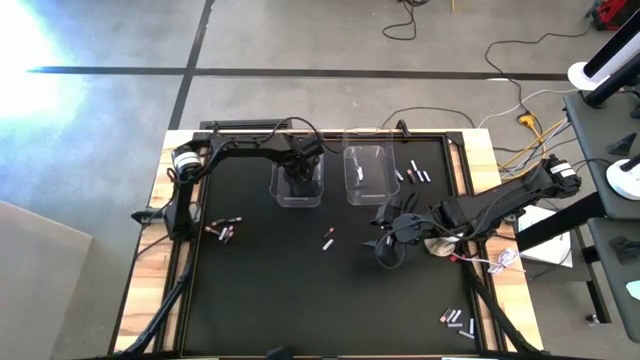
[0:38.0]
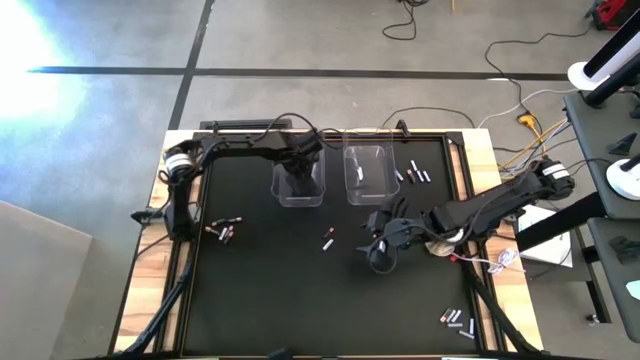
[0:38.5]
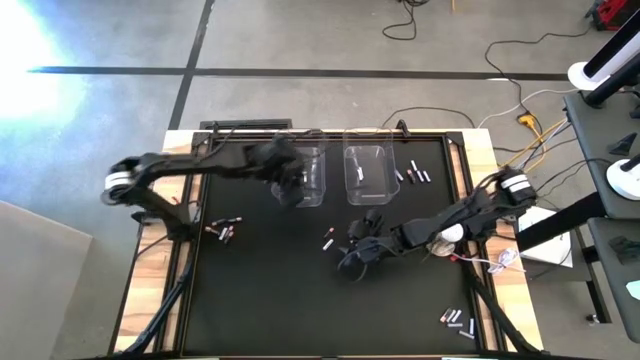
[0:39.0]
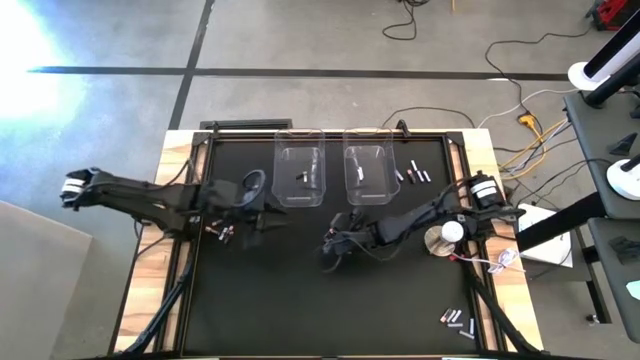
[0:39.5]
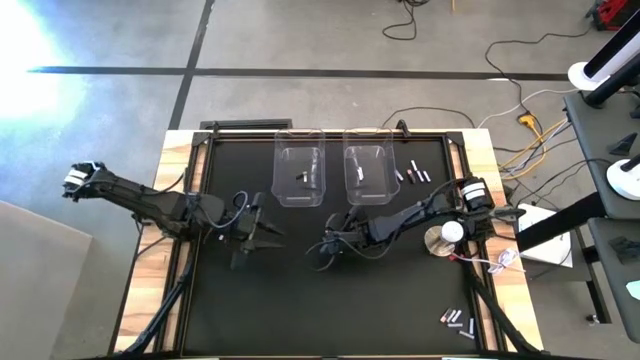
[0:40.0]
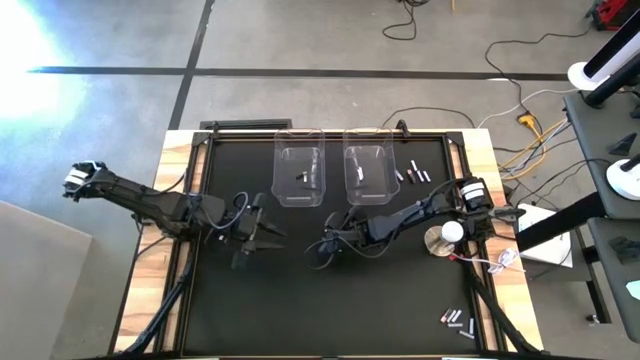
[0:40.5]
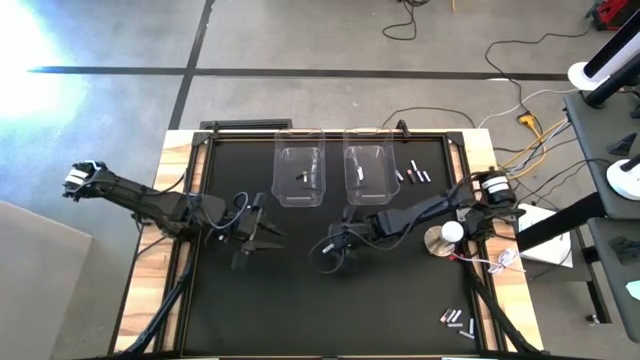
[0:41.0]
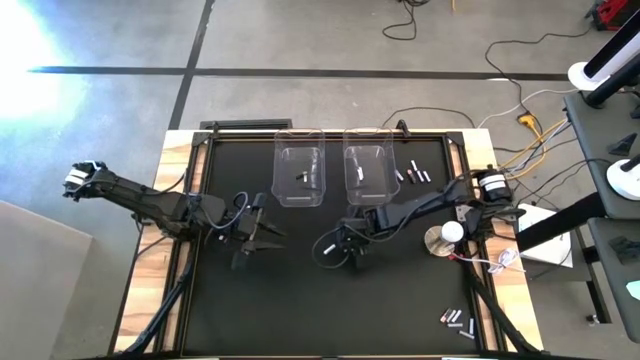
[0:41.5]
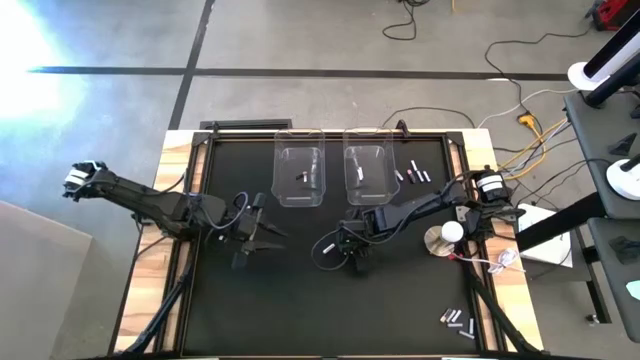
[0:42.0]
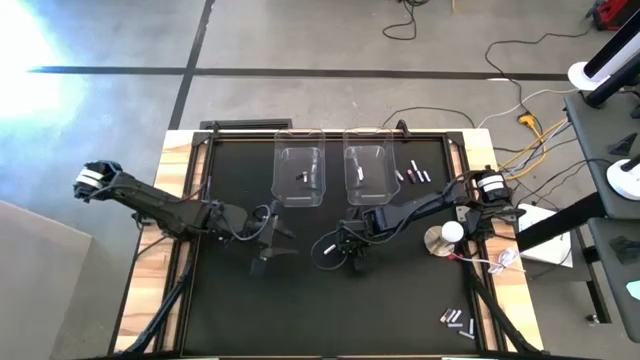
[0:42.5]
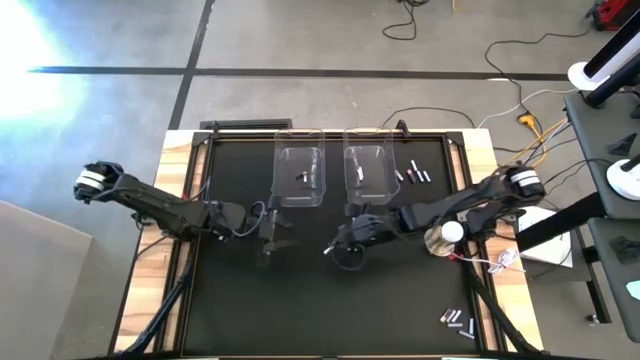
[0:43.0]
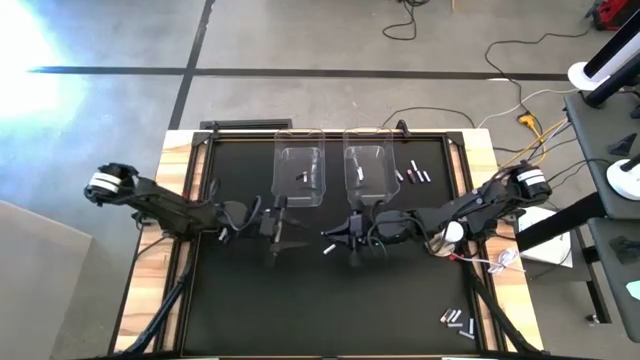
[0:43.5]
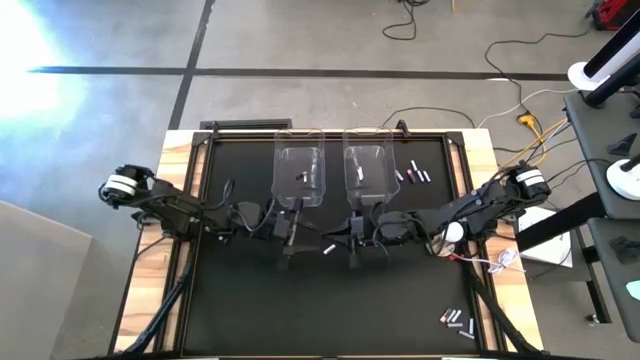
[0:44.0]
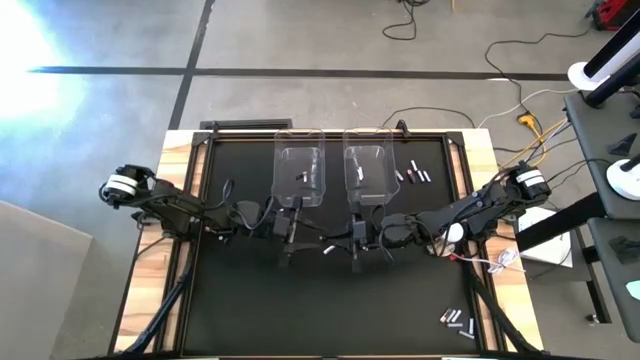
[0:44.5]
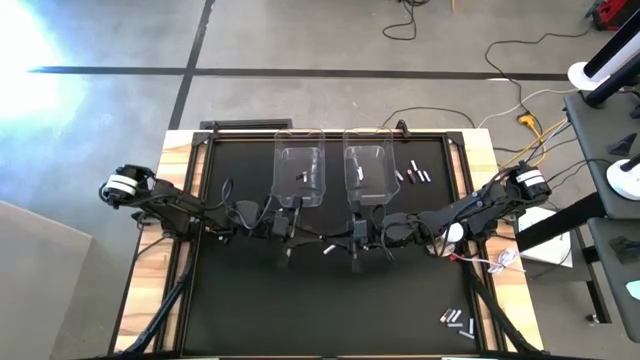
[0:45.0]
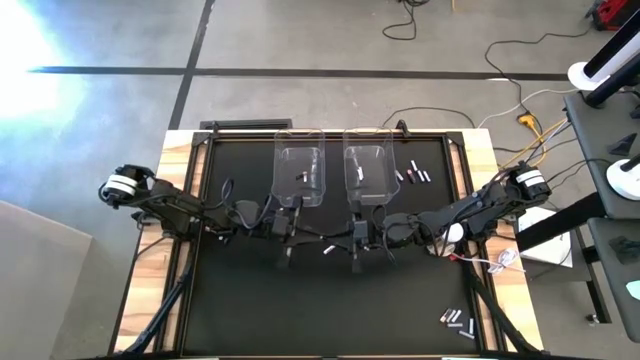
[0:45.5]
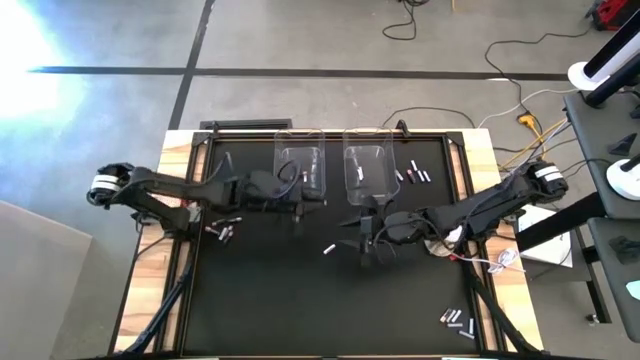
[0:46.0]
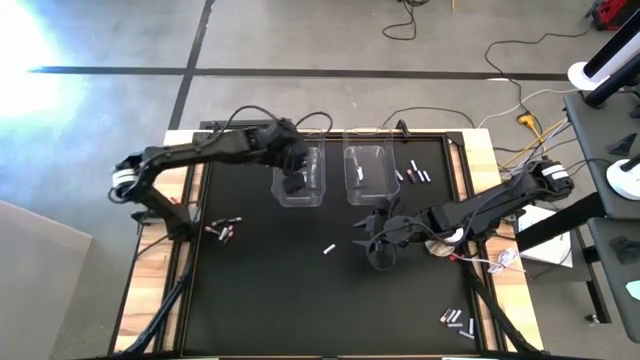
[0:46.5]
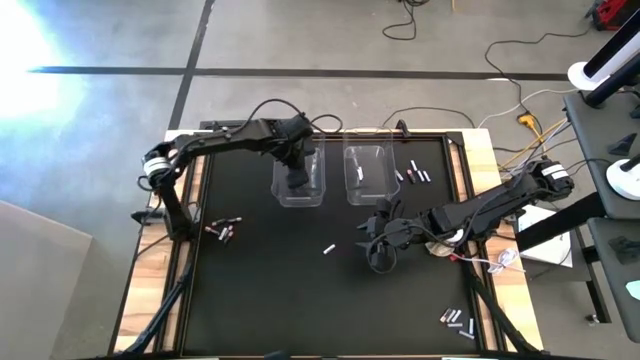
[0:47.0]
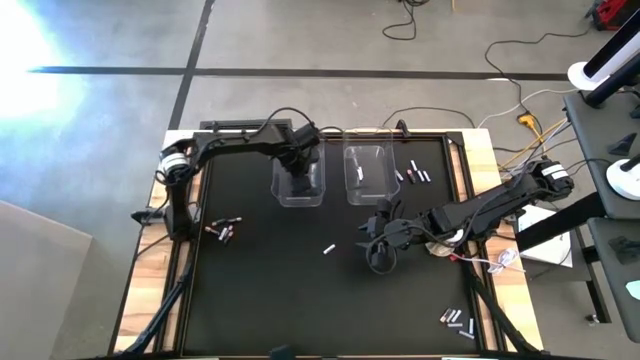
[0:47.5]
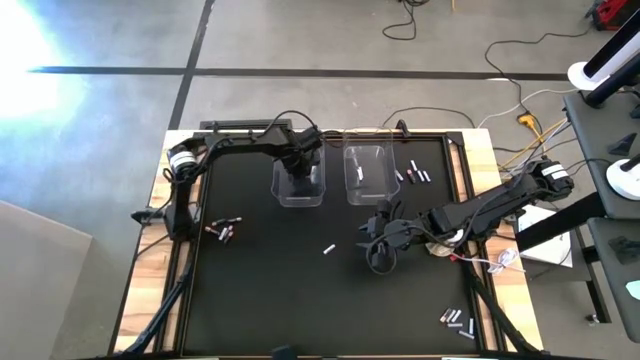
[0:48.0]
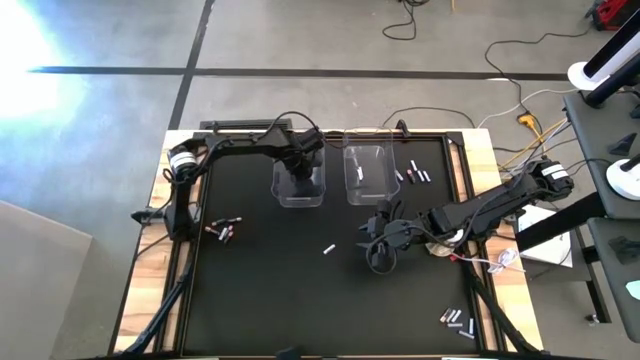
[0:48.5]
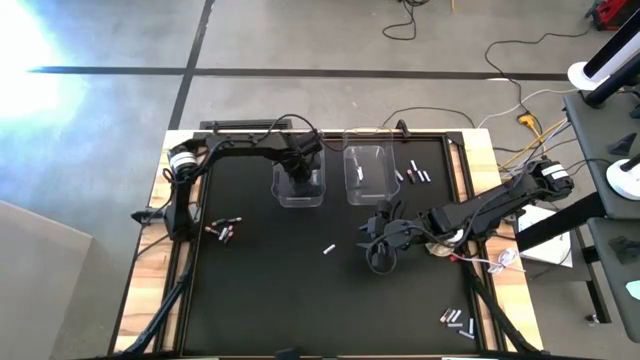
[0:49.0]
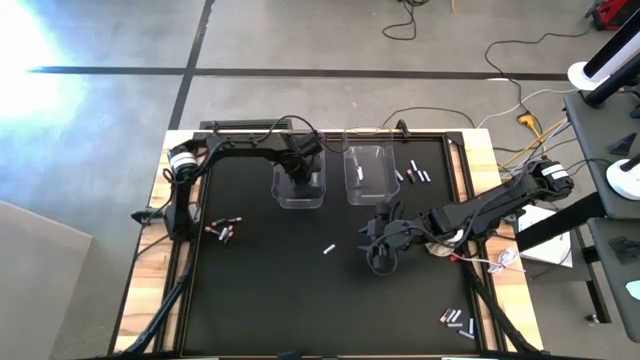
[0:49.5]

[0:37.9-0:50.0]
Task: Sort batteries
Put the black battery into the left transparent bin

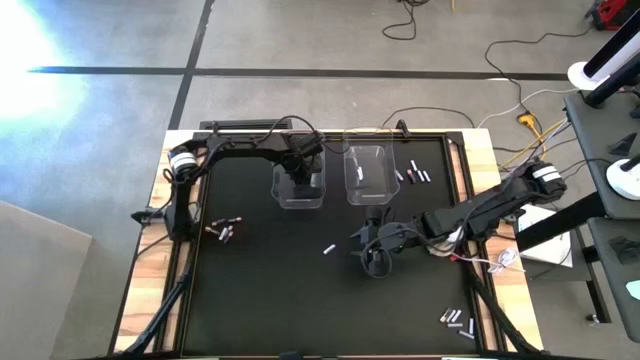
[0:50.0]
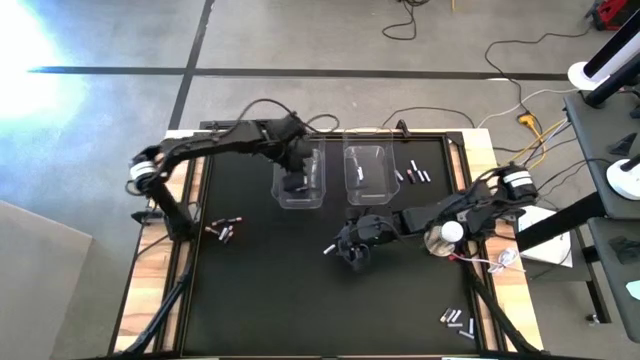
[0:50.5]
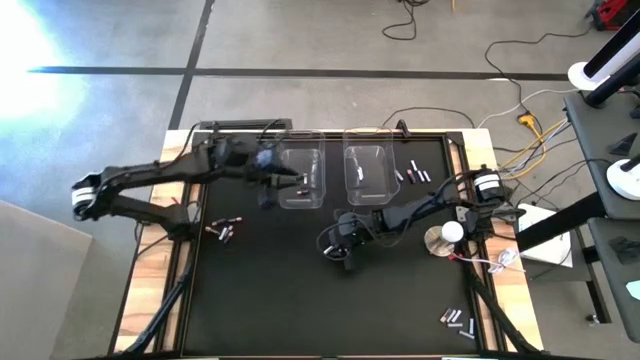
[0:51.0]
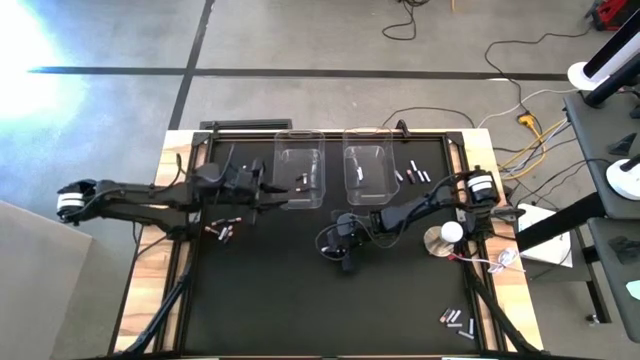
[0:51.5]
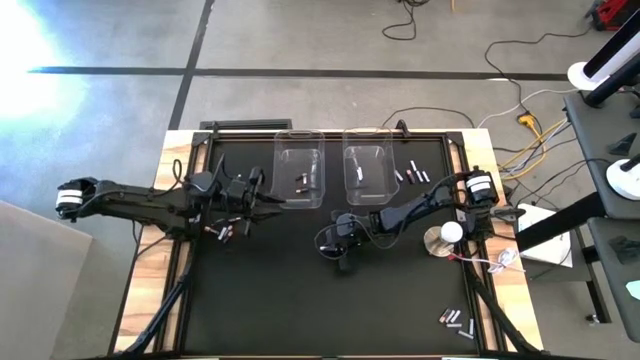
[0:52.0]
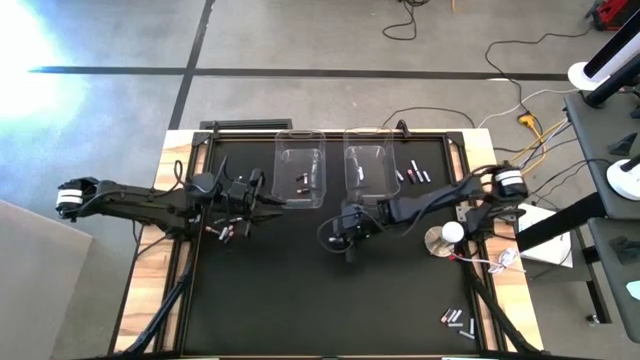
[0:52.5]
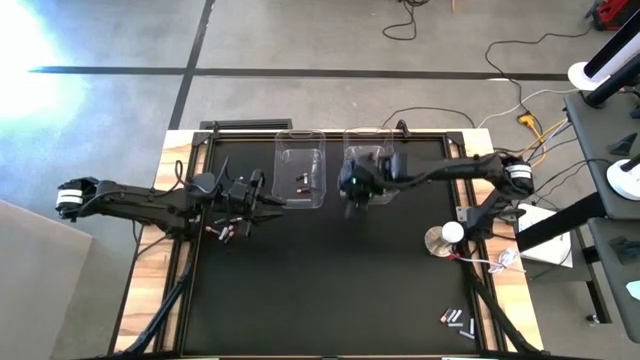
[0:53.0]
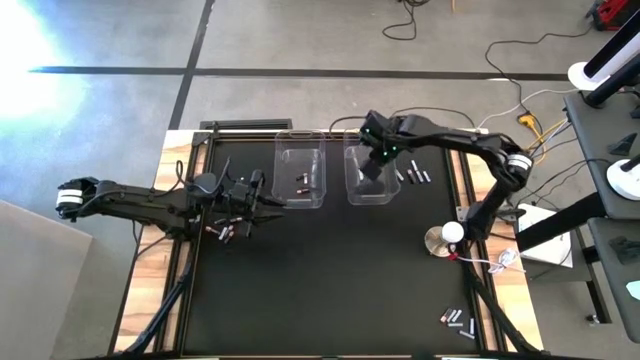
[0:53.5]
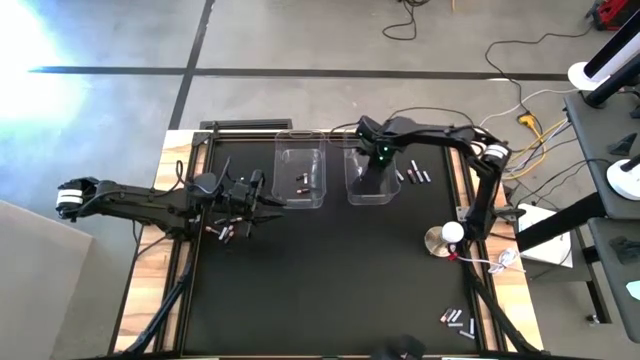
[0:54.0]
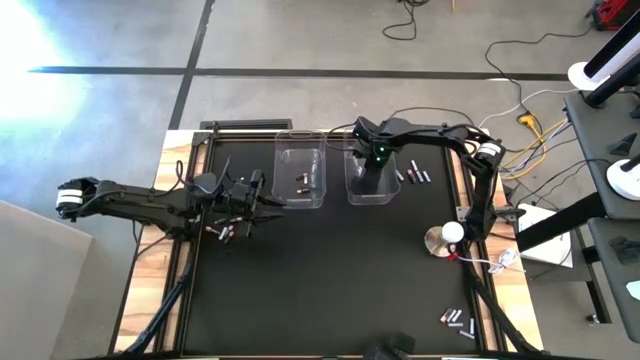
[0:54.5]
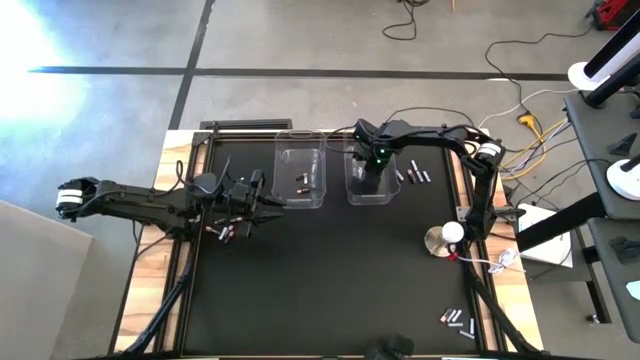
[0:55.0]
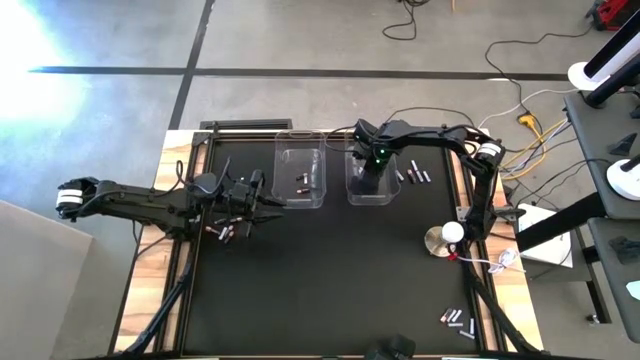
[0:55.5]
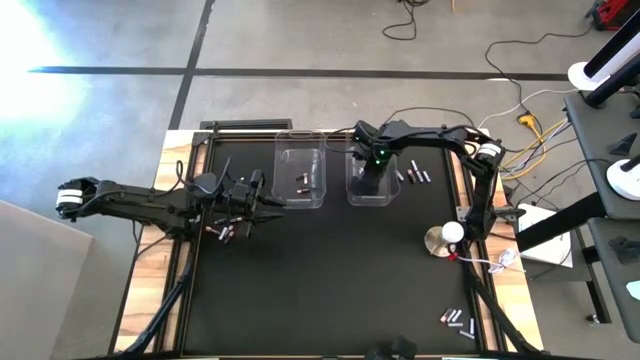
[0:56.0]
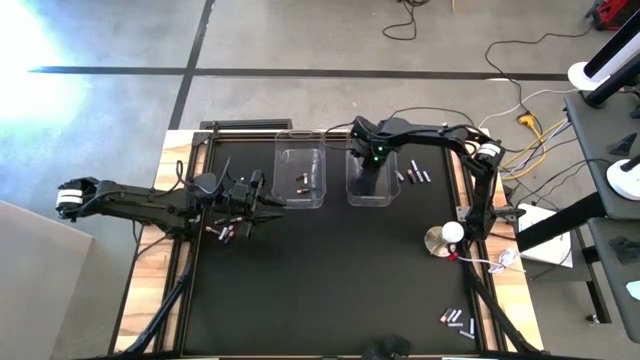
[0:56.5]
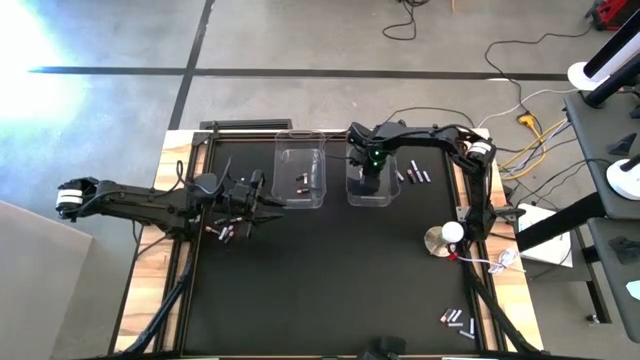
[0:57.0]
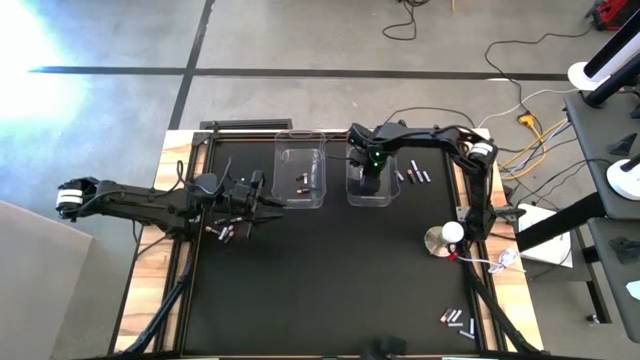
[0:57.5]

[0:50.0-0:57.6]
Put the white battery into the right transparent bin

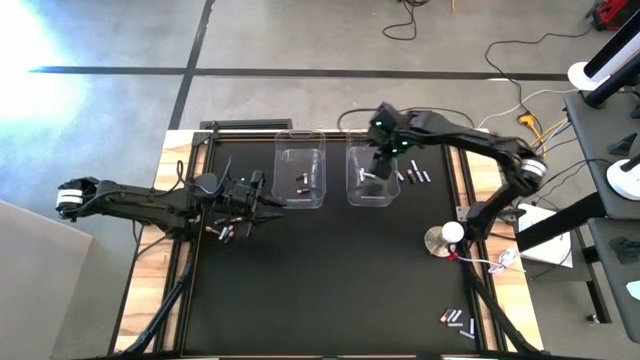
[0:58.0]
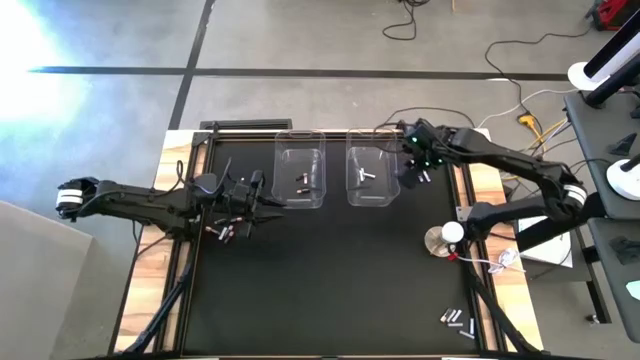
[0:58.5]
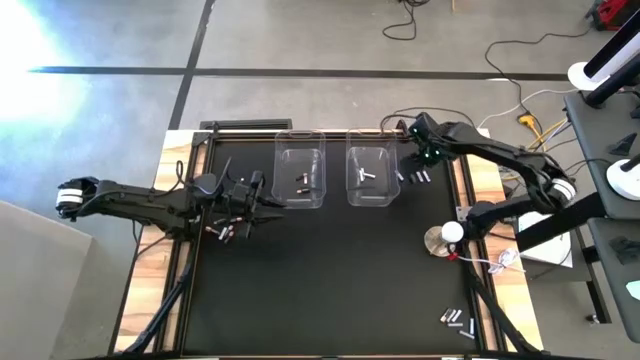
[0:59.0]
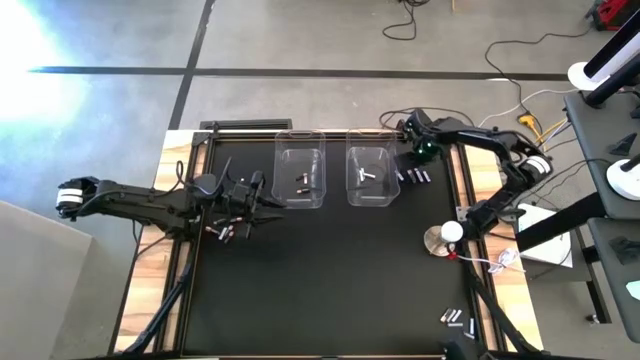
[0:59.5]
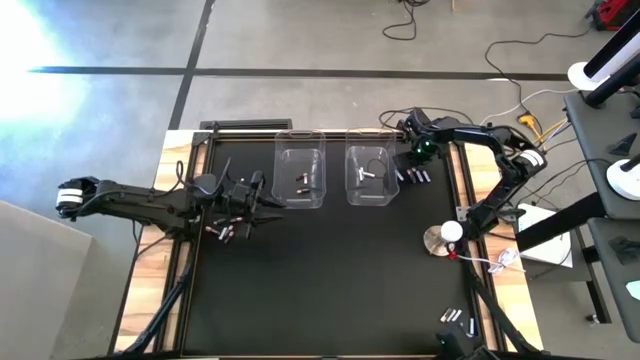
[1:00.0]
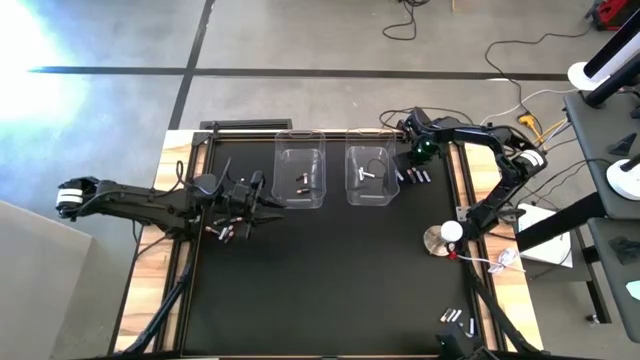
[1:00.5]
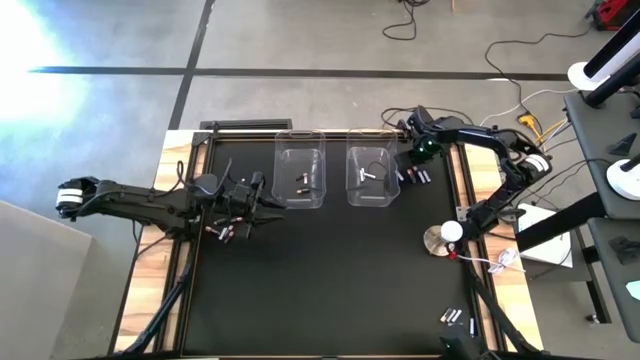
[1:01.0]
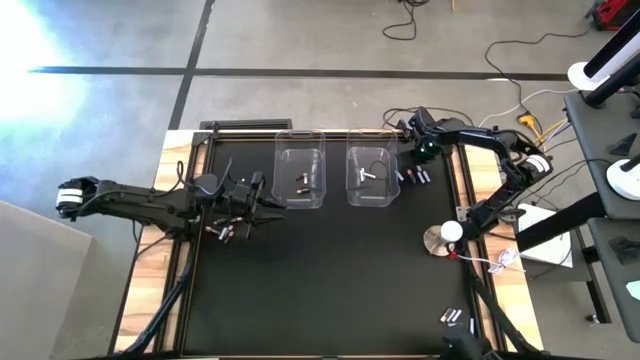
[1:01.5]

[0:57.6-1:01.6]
Put the white battery into the right transparent bin
